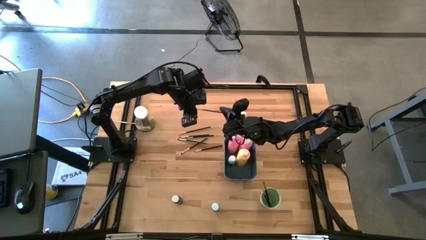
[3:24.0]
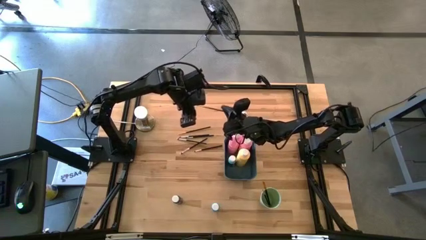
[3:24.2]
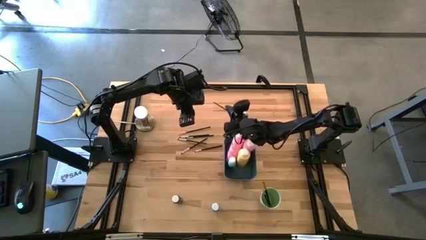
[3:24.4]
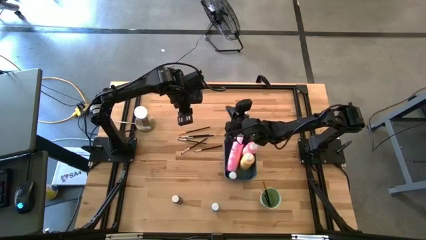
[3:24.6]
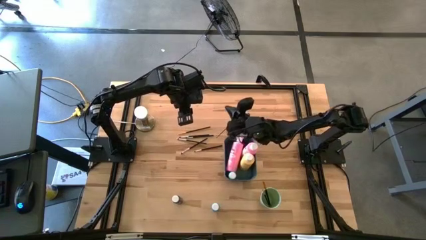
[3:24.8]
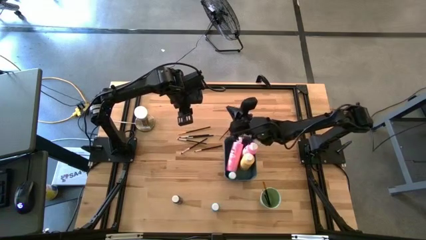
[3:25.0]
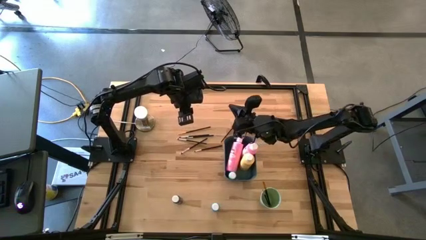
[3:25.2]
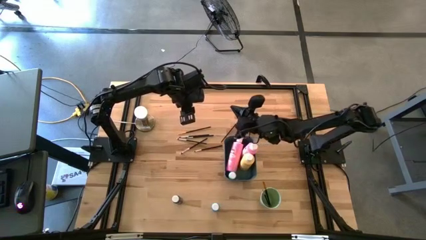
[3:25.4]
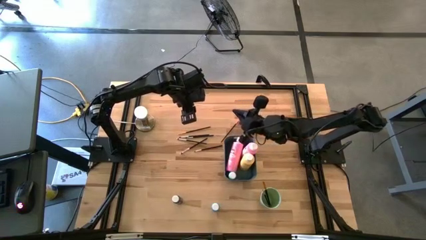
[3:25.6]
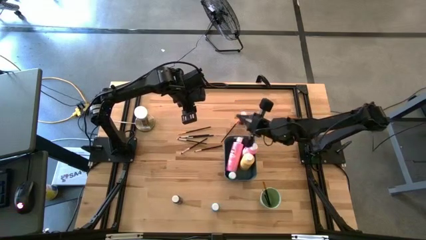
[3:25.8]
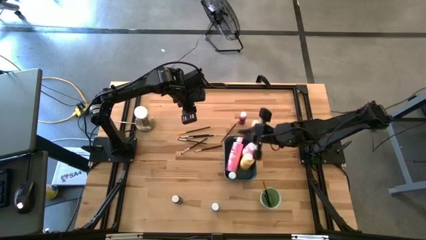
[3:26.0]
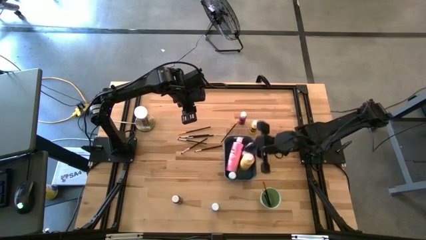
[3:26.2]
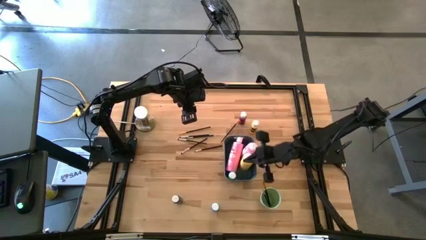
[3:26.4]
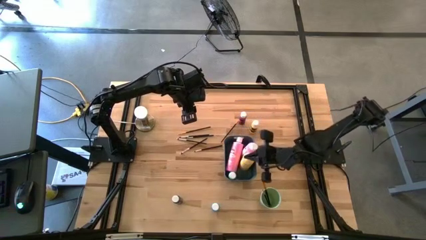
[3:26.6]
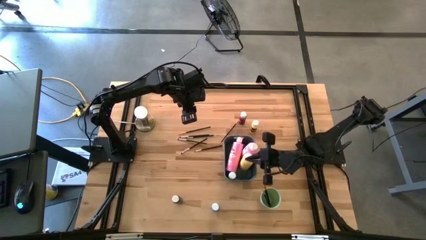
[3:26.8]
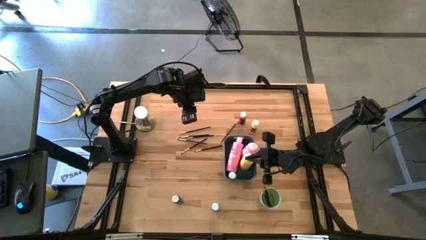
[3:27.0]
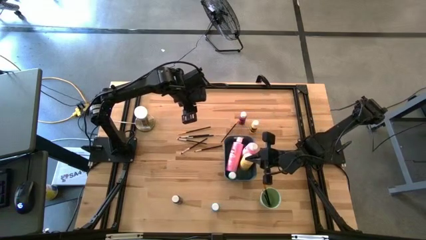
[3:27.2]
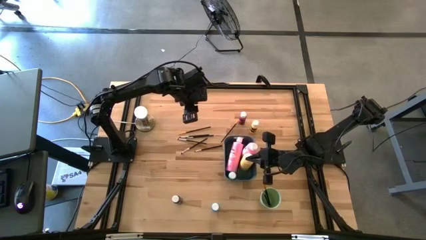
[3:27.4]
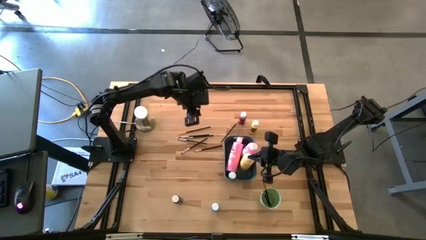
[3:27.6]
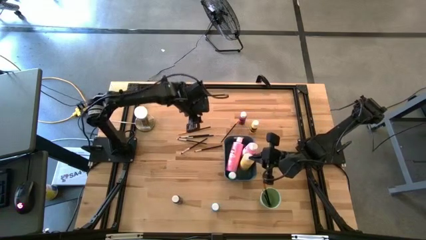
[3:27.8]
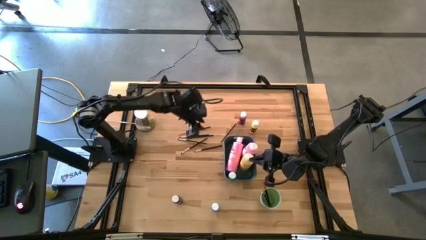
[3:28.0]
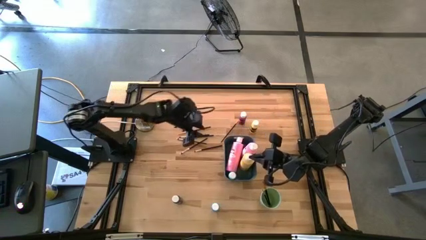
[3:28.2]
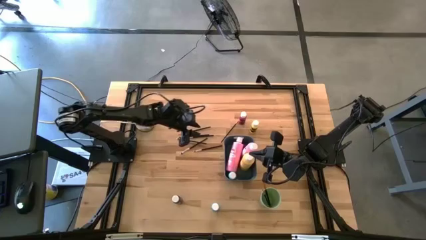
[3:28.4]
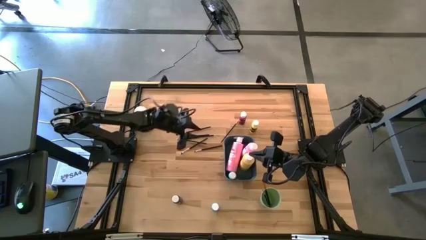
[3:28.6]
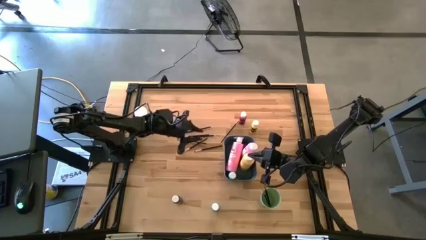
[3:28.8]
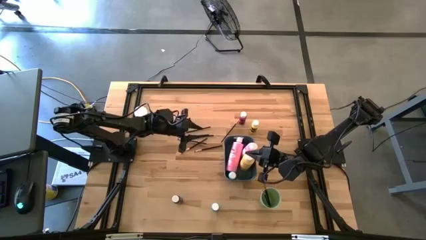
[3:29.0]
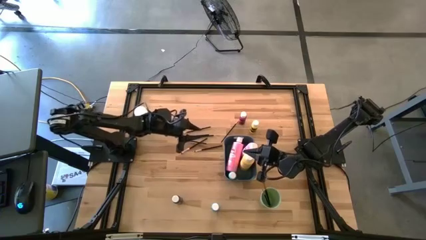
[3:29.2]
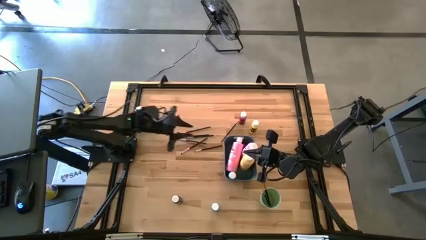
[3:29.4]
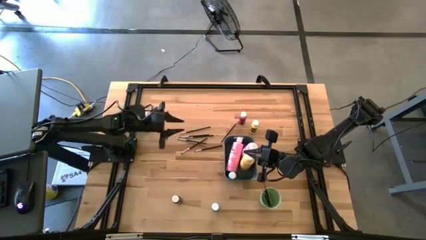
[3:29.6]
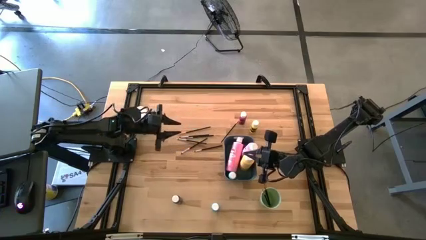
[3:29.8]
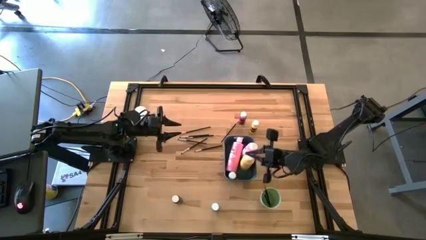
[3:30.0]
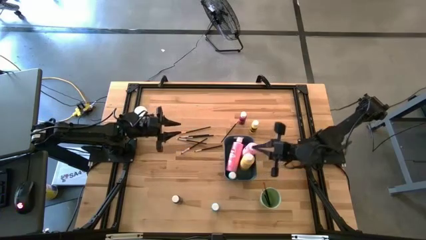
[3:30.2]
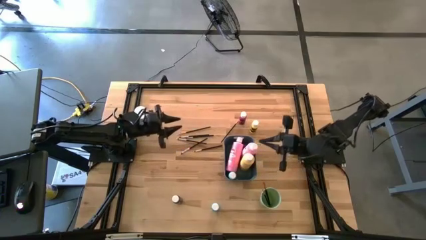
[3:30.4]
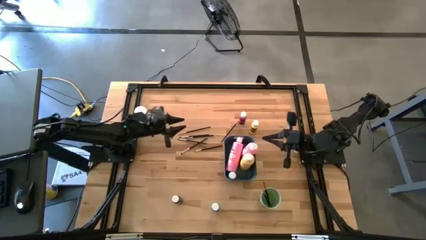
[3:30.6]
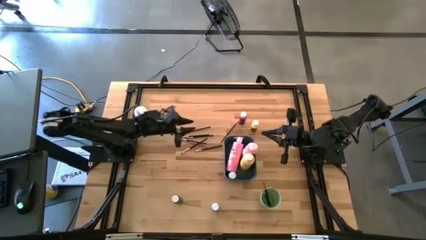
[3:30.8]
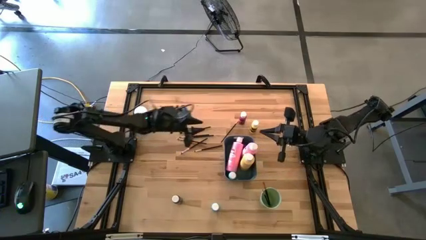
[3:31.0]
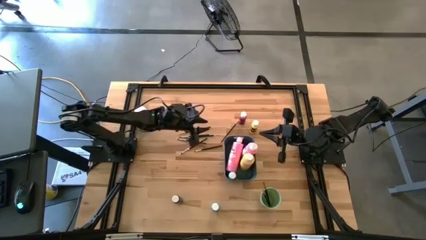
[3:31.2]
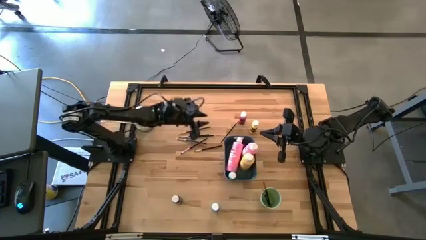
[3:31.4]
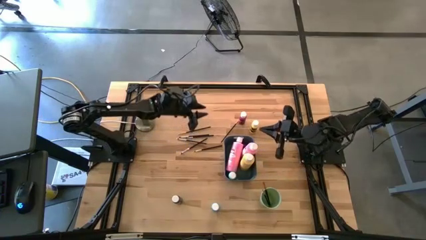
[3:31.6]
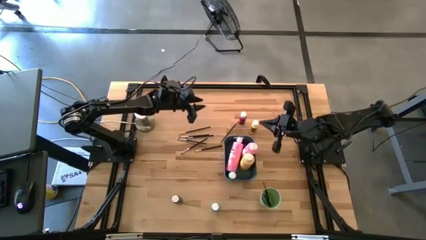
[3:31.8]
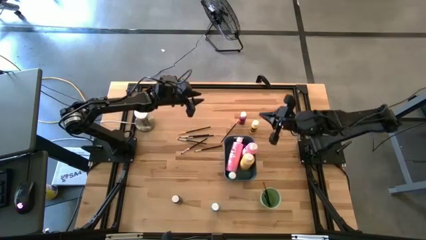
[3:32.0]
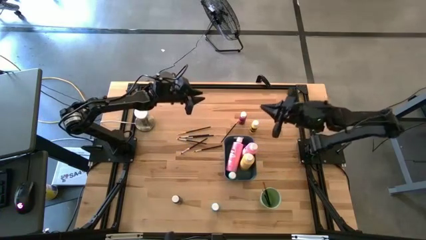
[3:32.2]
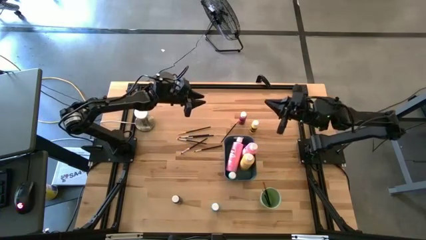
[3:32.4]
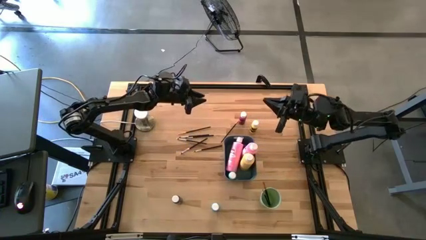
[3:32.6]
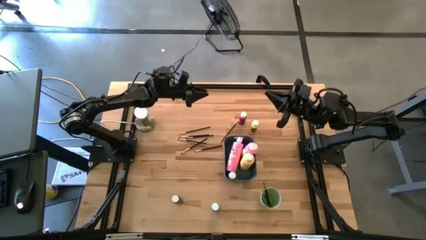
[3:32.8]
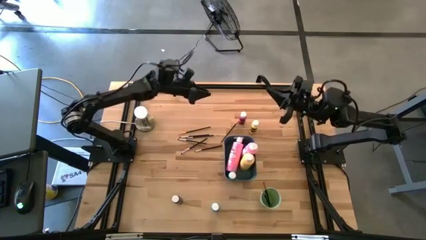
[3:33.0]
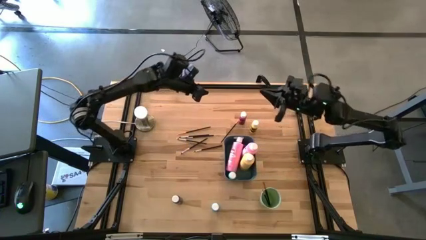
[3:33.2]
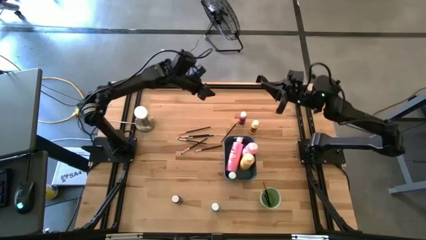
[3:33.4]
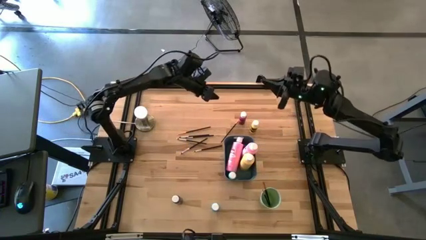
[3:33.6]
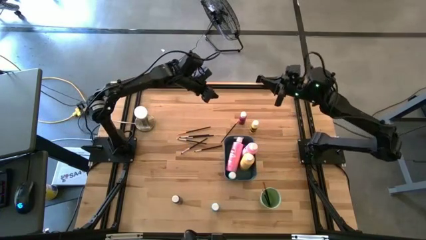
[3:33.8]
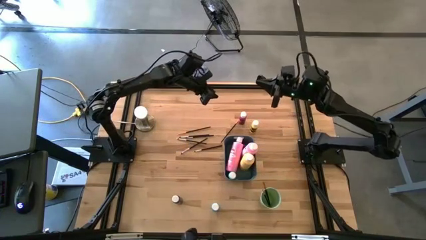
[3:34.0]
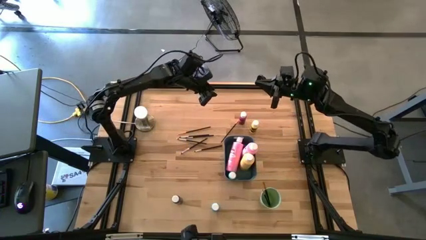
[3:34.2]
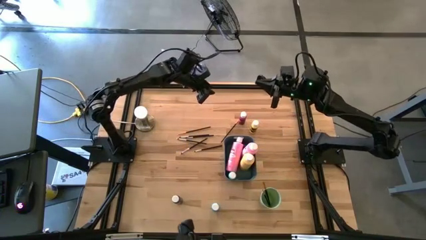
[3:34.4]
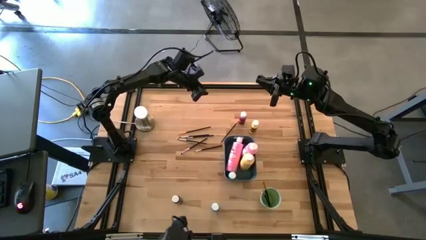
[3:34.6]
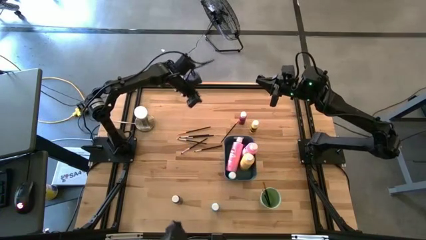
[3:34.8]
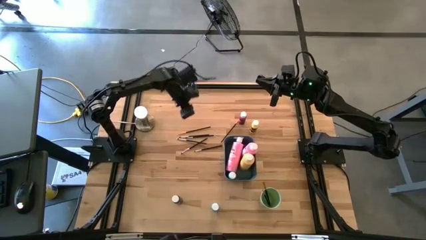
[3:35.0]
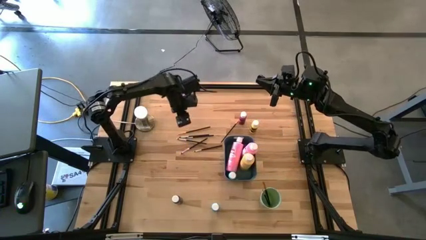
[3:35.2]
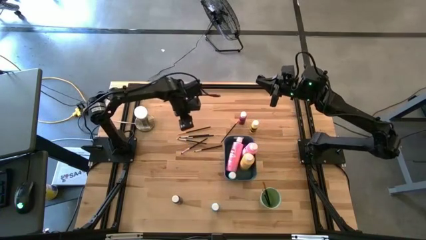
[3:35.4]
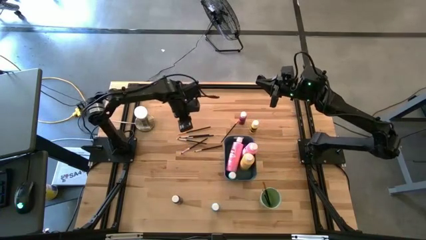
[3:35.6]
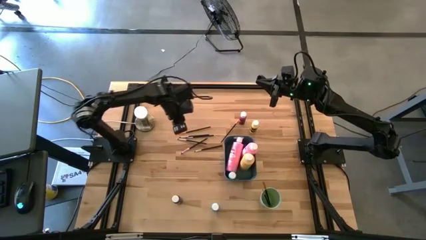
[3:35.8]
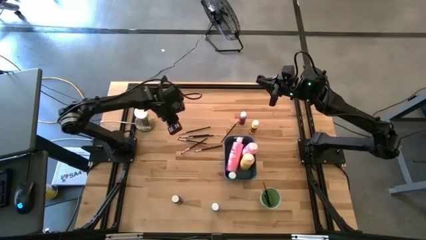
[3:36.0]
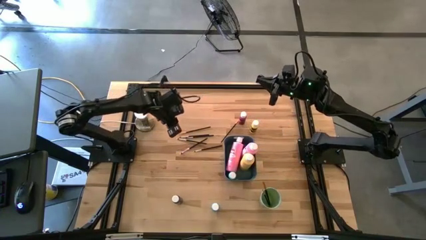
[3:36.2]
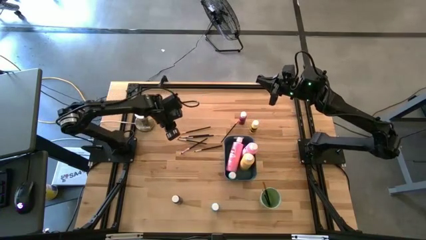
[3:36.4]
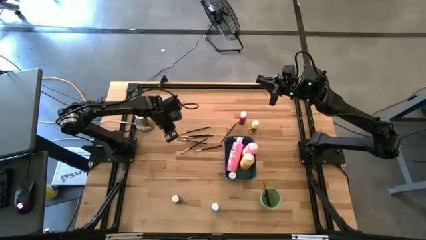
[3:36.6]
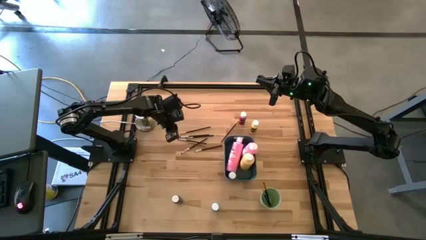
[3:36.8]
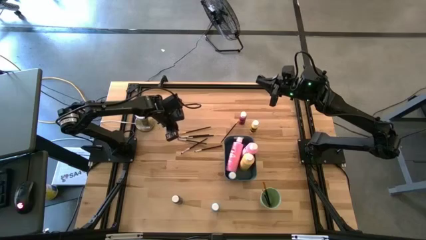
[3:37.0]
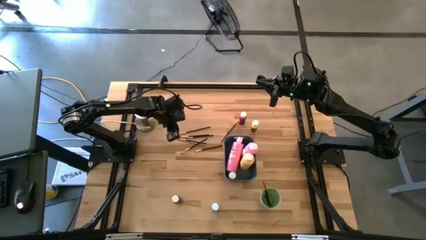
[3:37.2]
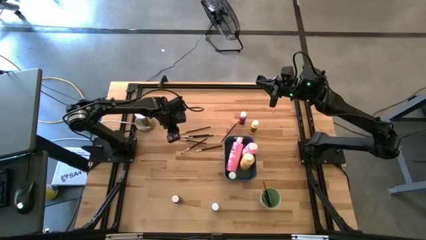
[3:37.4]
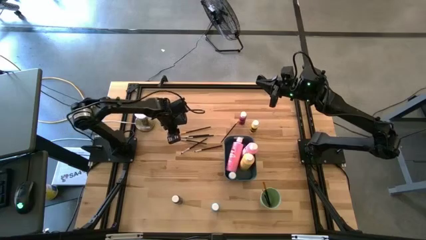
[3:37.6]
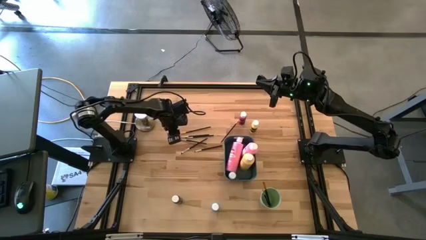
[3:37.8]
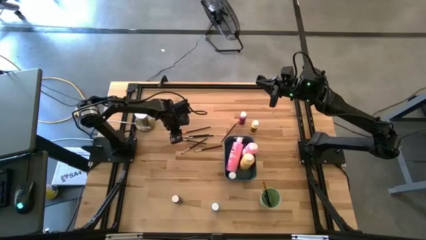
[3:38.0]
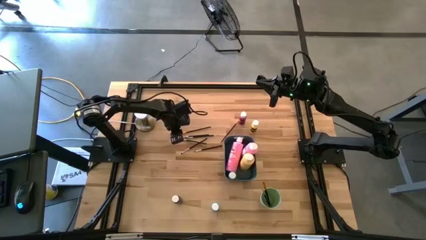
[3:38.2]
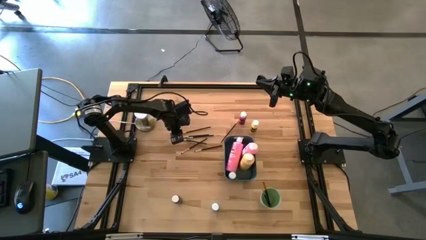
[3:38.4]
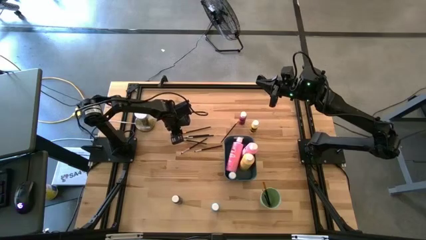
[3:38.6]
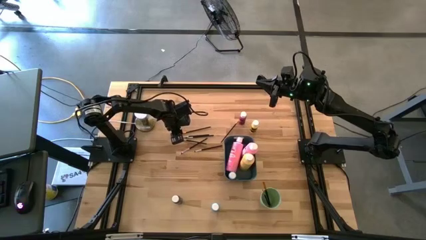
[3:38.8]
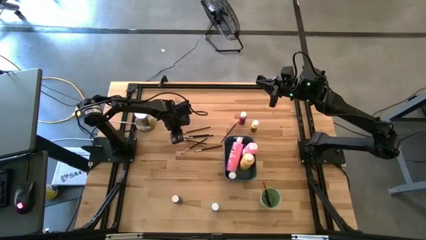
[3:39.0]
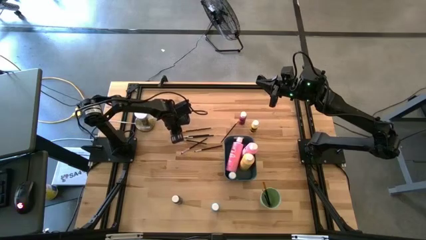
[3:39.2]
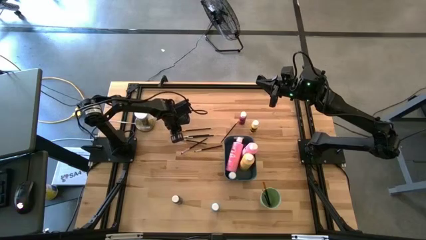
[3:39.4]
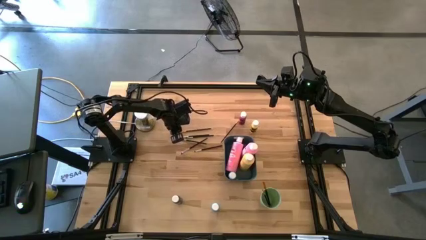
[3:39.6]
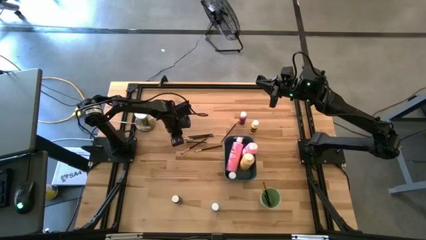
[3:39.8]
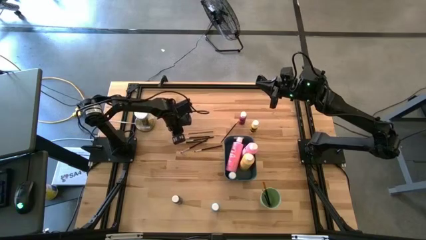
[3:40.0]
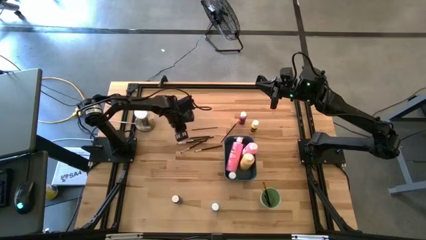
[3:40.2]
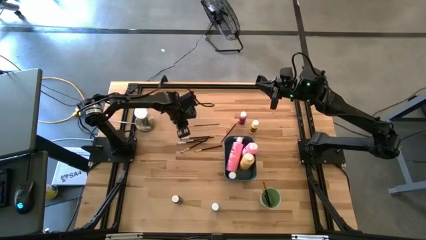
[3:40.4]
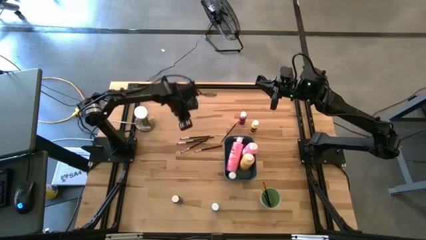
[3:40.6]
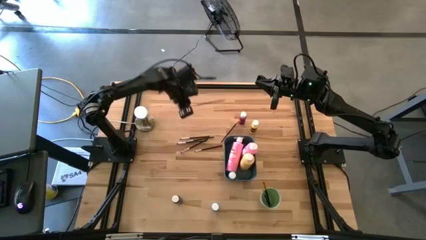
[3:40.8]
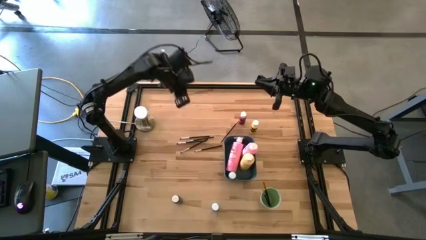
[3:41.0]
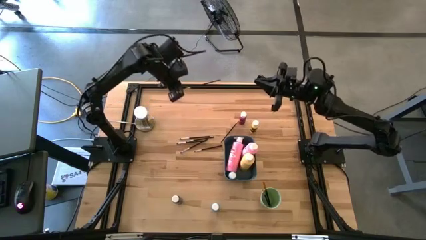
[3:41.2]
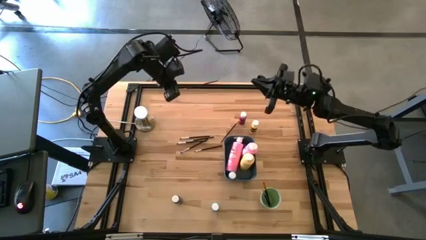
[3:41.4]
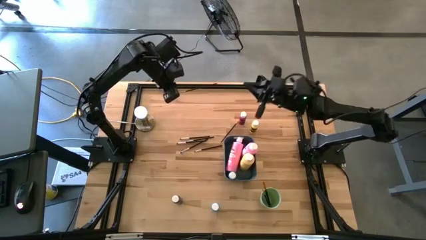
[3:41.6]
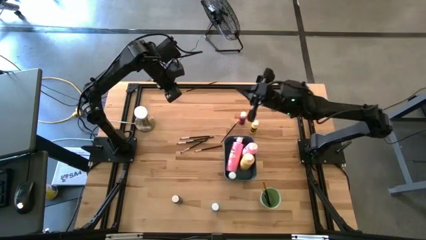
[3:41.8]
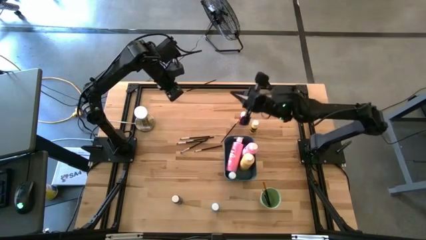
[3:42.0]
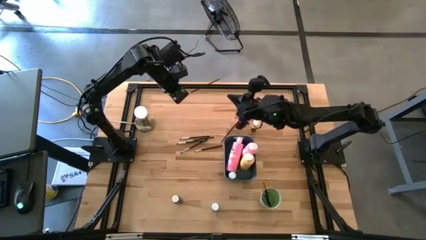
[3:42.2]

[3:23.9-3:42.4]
Task: Pick & Place Paint Supplies
Put the black and gold paint brush into the green cup
